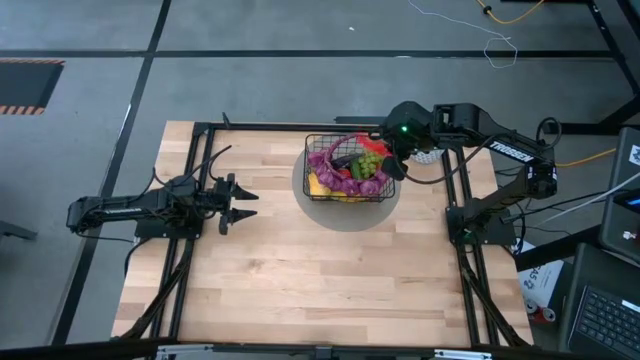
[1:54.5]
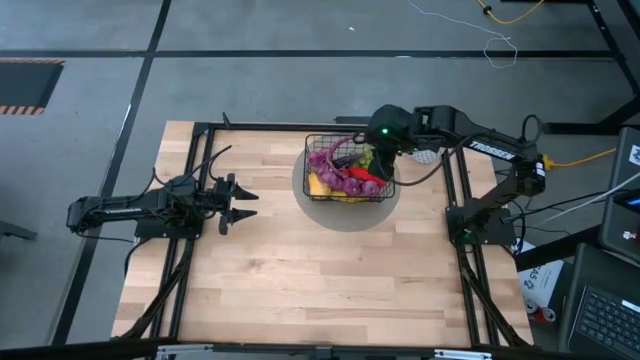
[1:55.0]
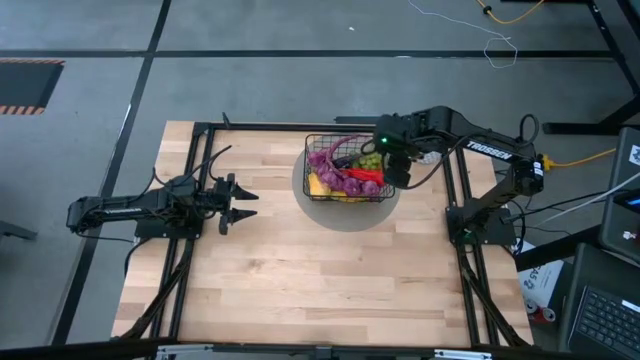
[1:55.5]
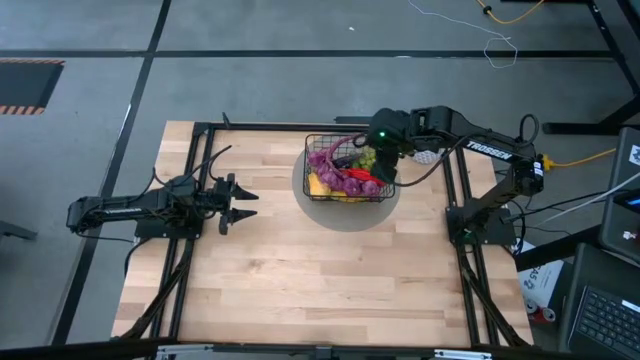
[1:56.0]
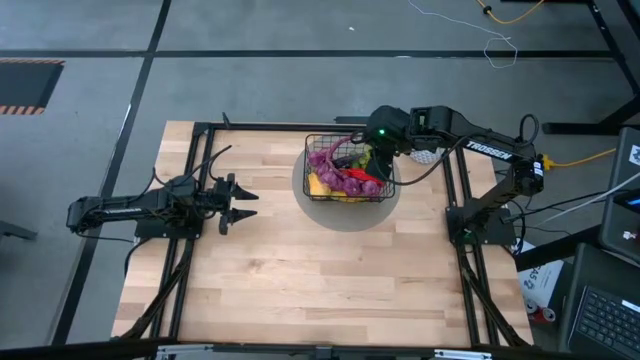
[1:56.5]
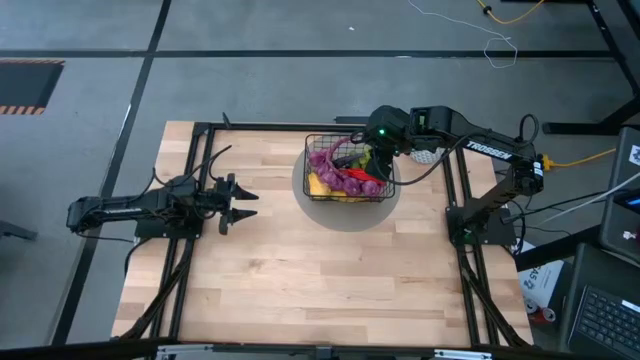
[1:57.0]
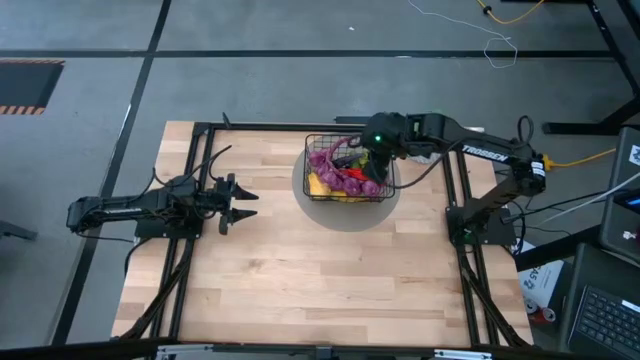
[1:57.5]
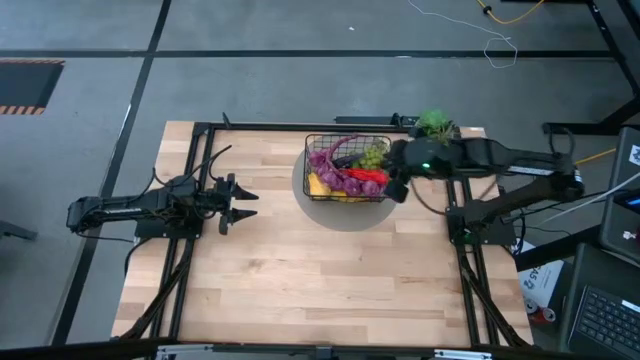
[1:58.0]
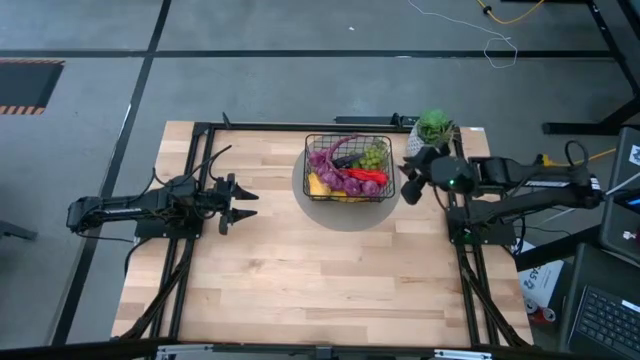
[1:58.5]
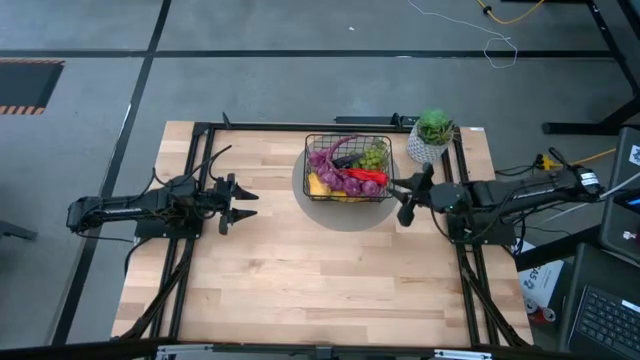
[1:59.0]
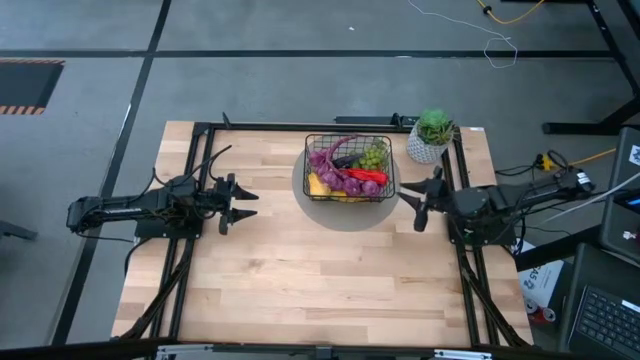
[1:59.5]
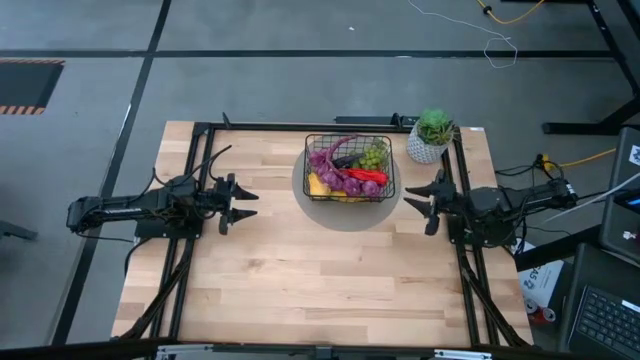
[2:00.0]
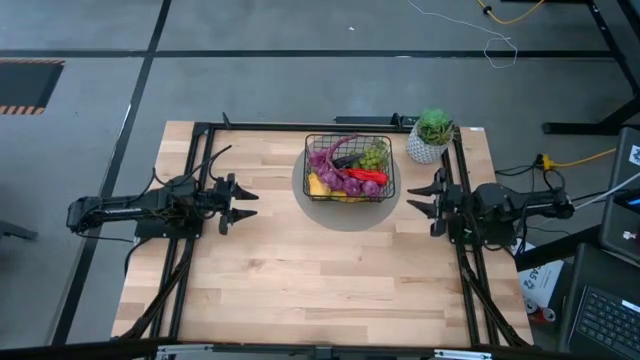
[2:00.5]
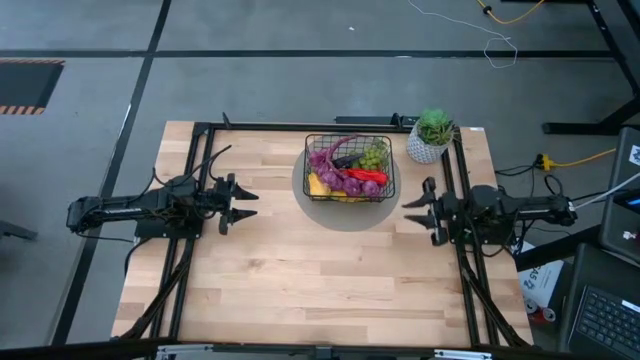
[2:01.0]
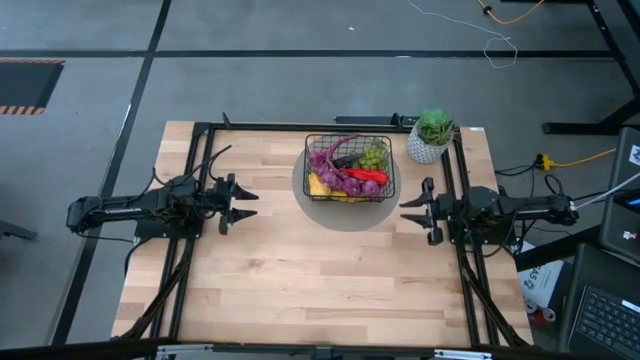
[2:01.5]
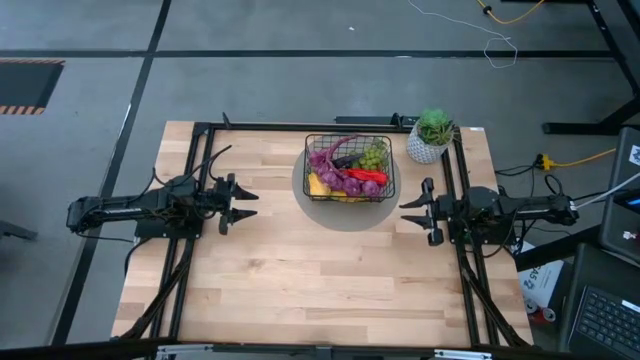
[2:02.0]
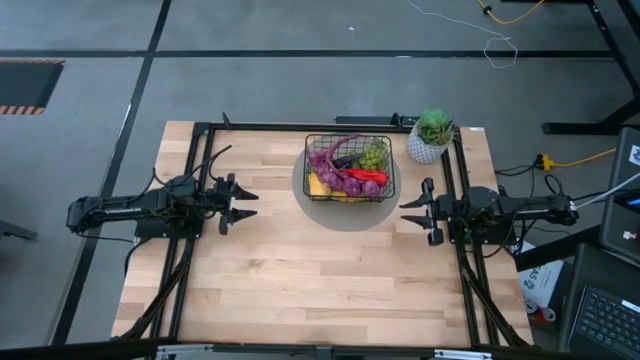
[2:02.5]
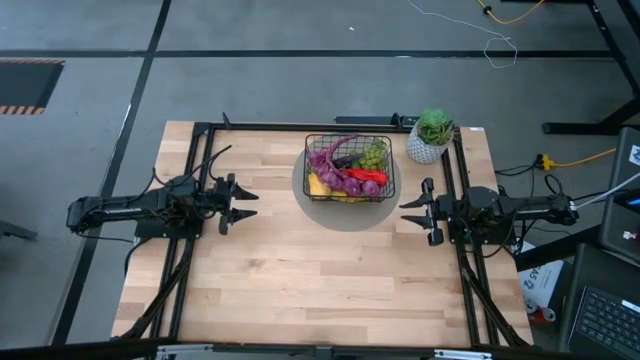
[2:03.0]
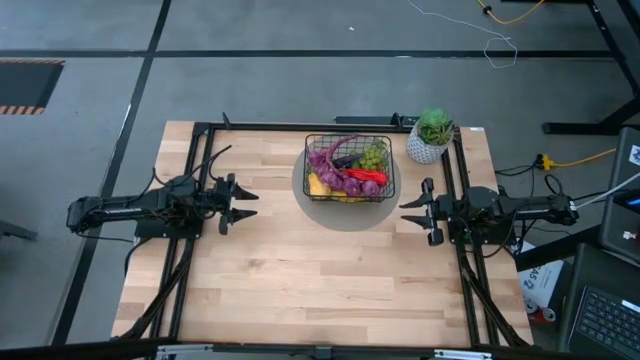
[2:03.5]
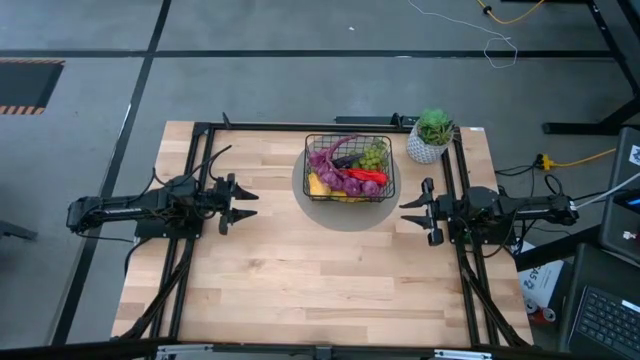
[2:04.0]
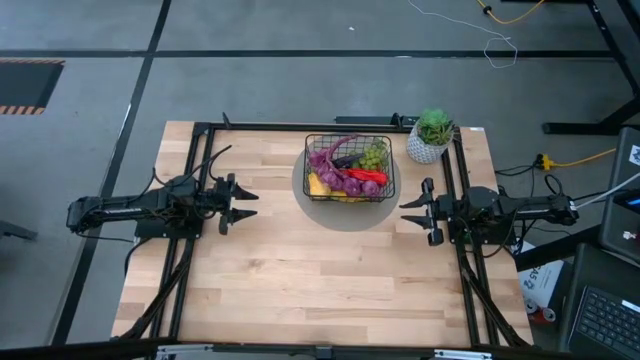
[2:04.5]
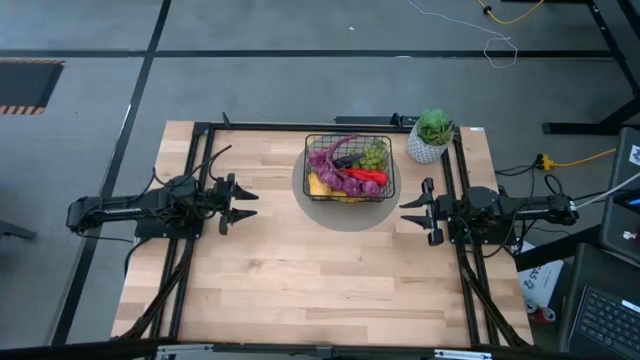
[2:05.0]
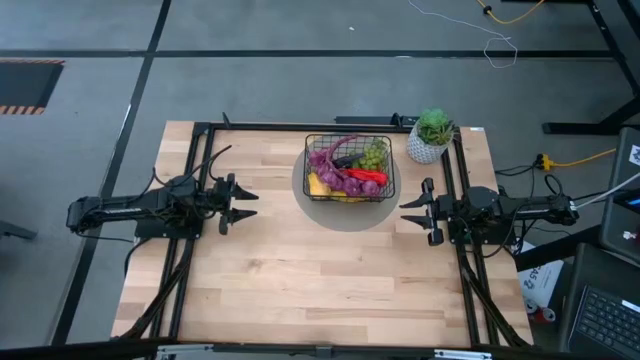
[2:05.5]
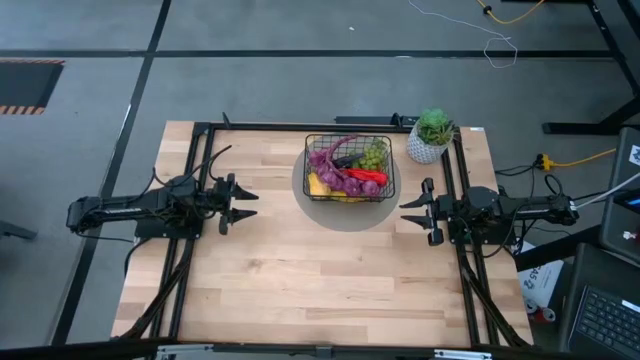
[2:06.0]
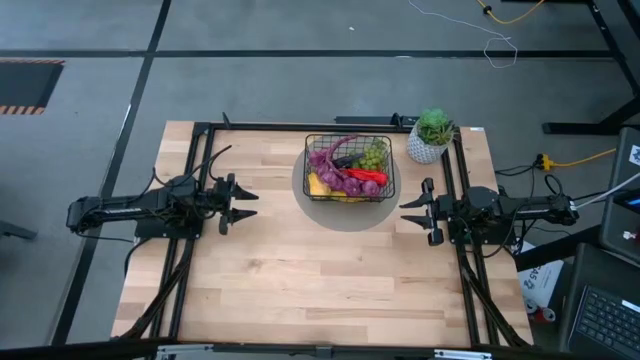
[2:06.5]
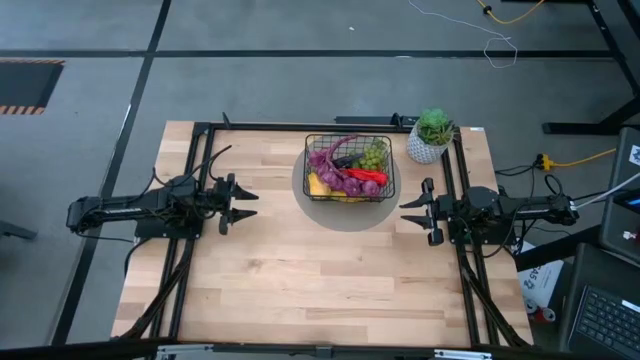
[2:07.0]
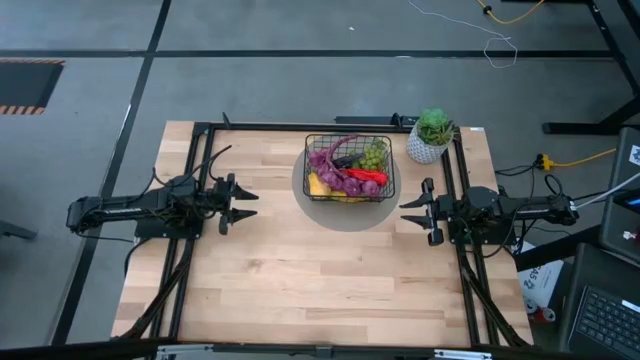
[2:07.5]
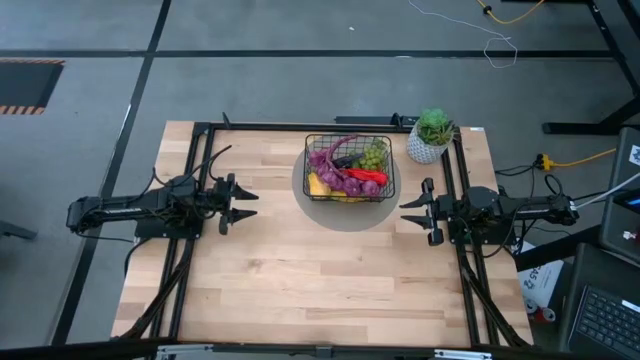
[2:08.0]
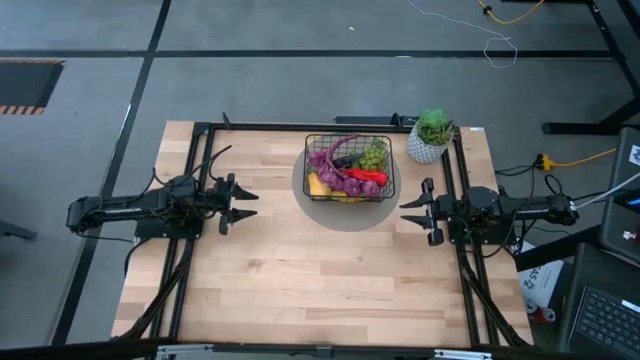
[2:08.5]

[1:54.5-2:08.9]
Task: Build produce basket
Return to Home Position

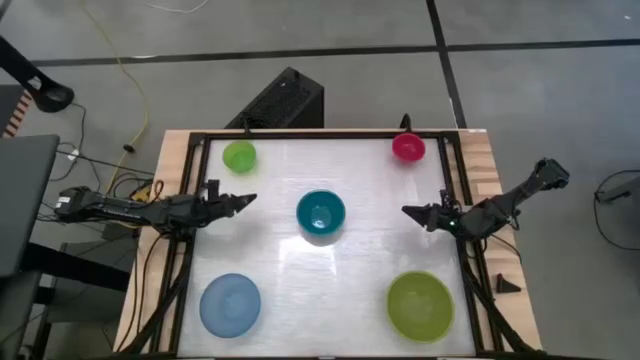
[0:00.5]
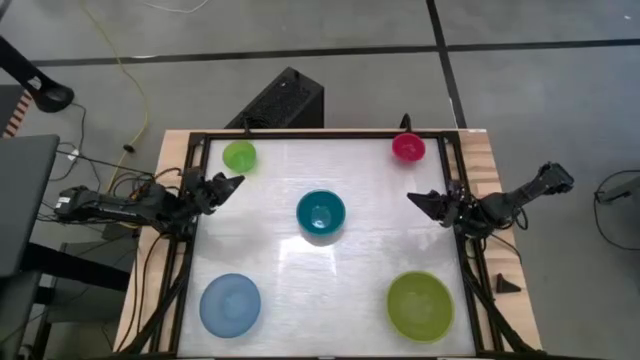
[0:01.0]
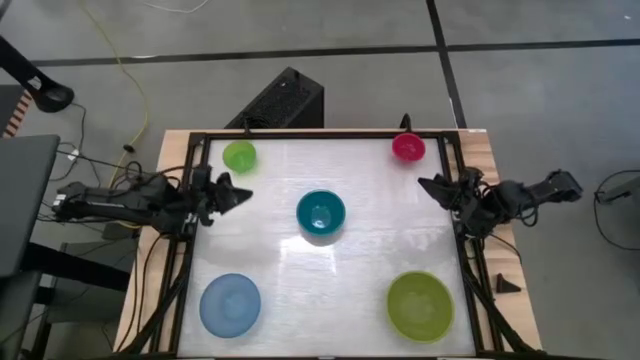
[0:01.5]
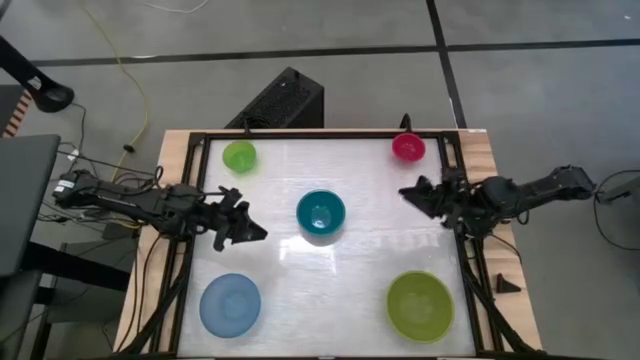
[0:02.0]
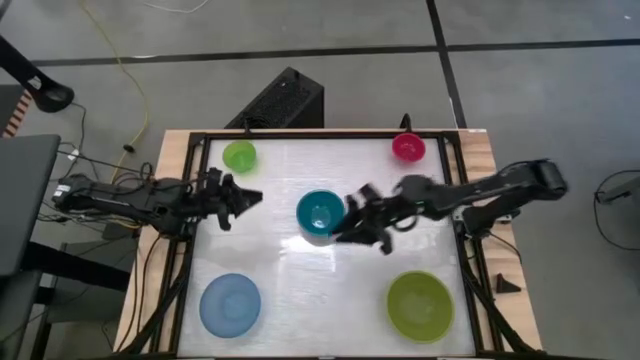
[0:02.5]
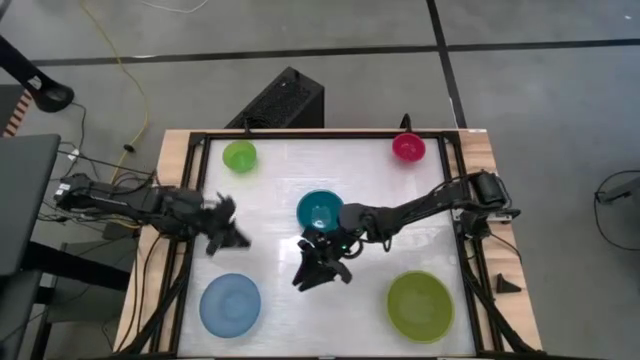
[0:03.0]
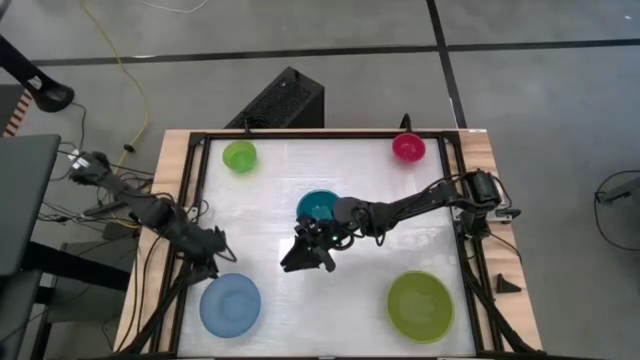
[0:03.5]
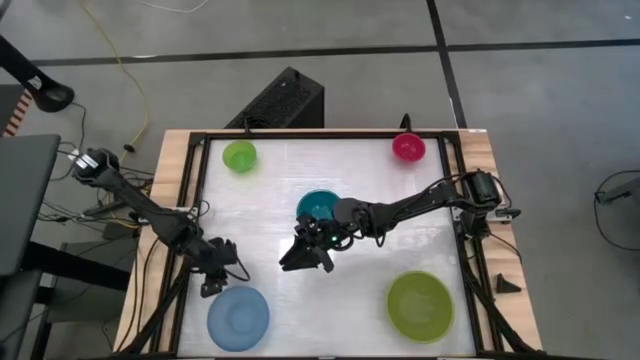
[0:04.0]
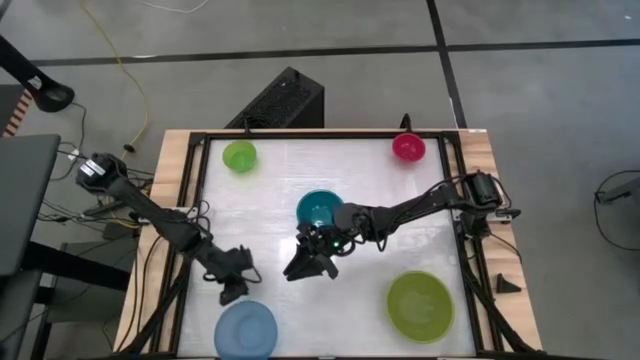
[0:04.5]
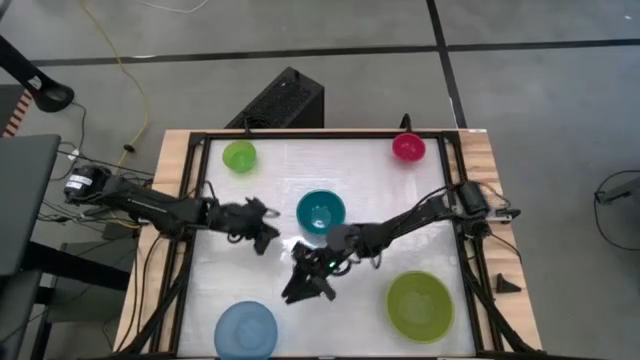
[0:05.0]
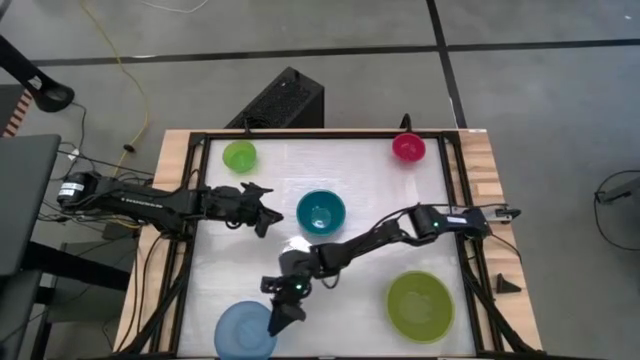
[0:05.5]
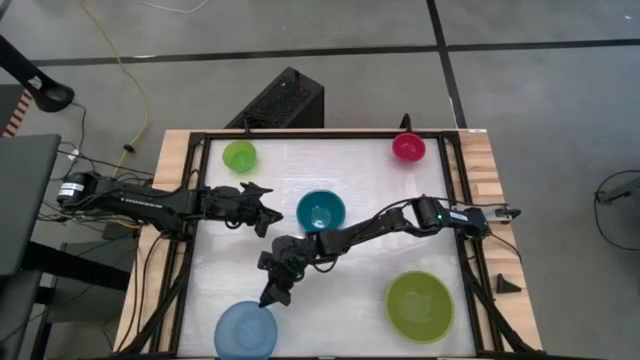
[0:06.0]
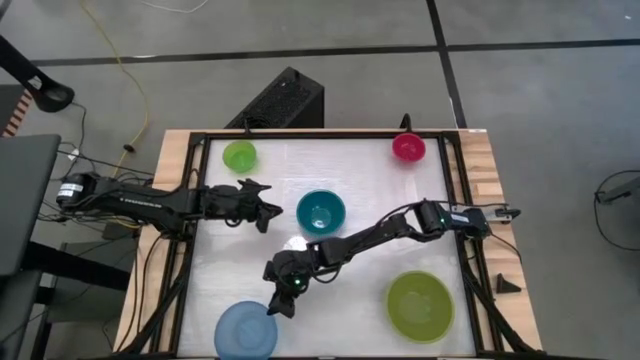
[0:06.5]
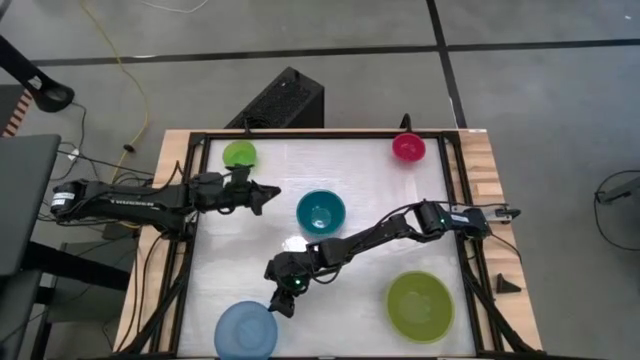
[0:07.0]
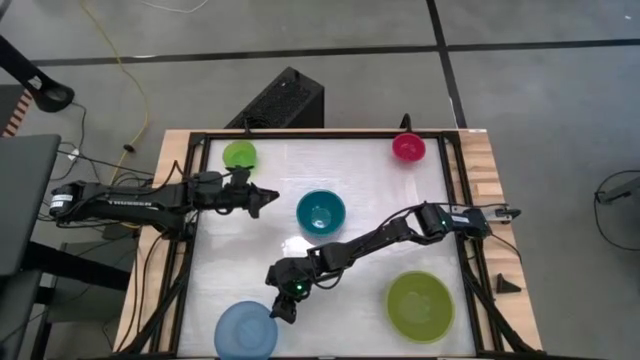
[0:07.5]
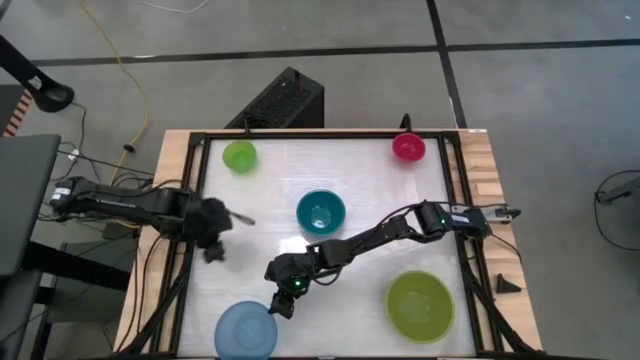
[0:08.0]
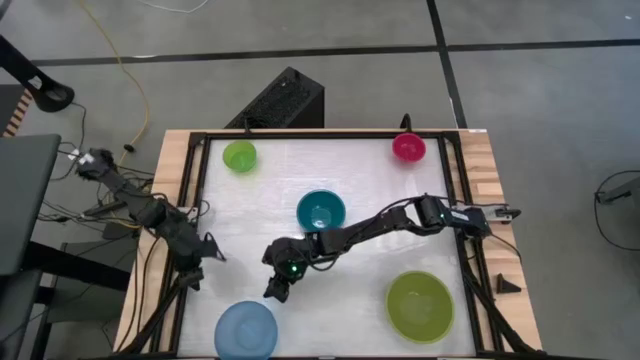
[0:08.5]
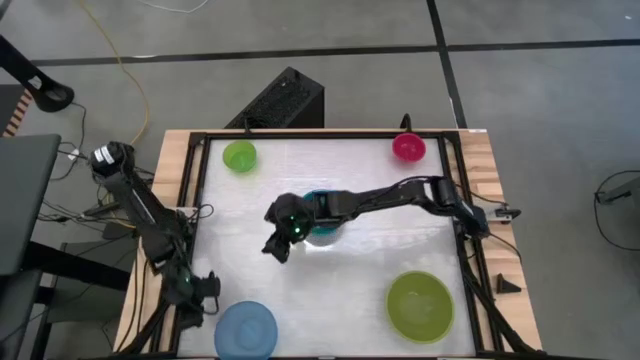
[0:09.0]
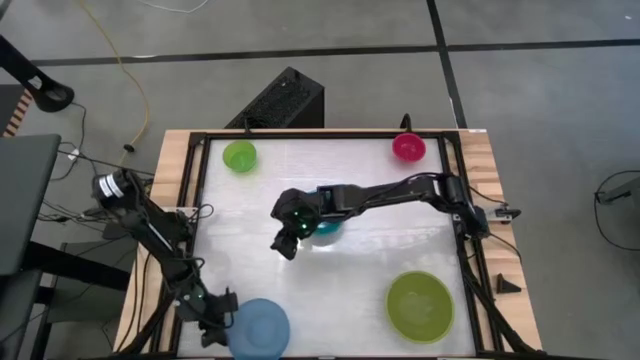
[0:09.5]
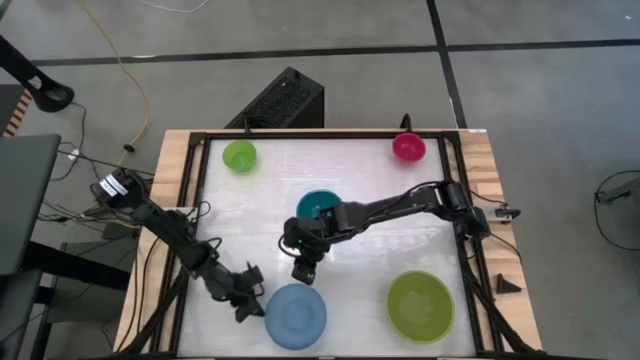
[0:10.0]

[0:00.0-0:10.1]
Task: Nest bowls inside each other by size order
Move the light blue bowl to the bottom center of the table
